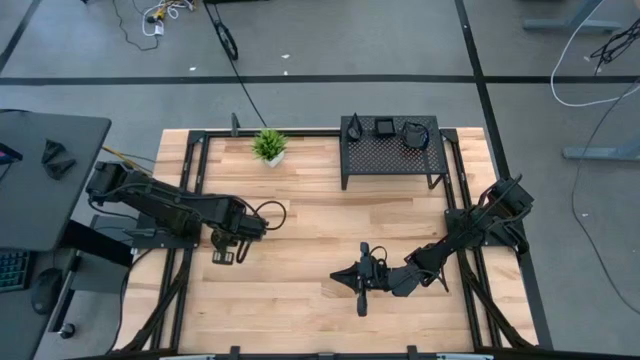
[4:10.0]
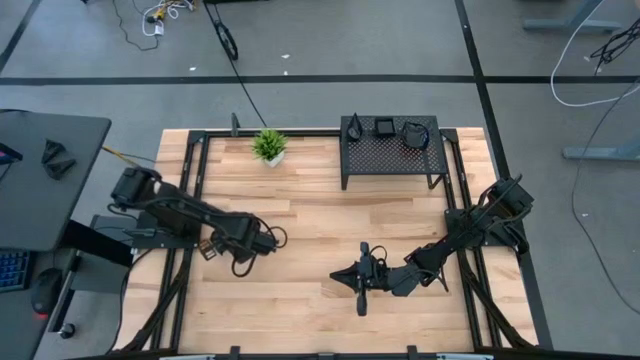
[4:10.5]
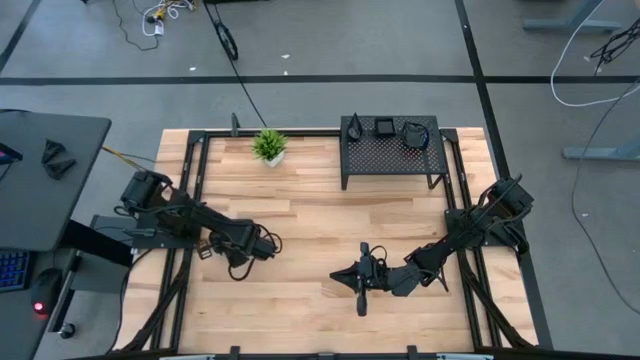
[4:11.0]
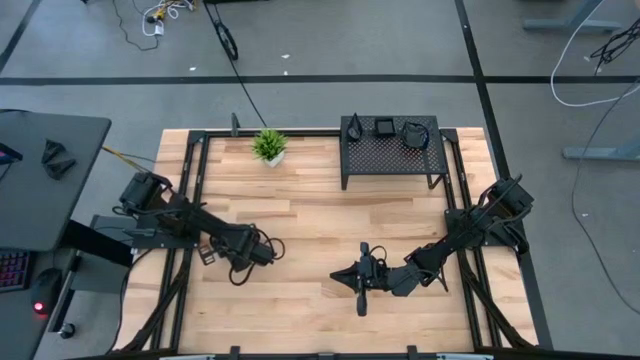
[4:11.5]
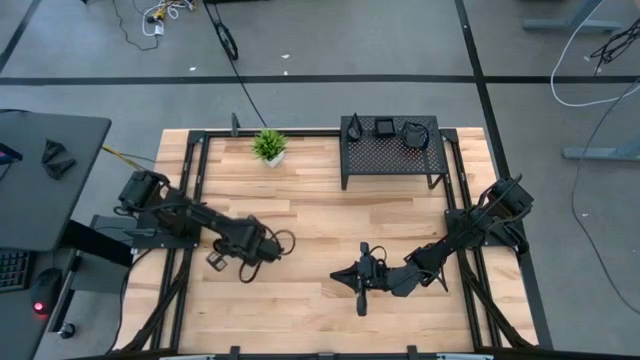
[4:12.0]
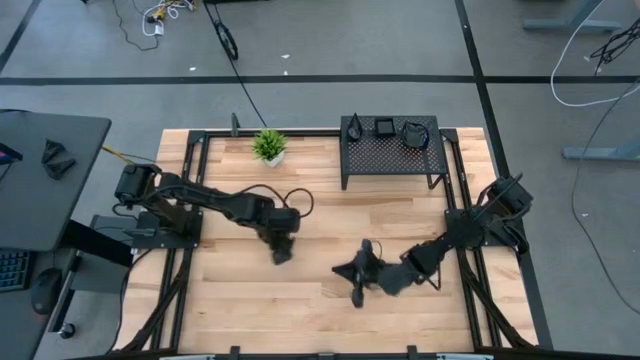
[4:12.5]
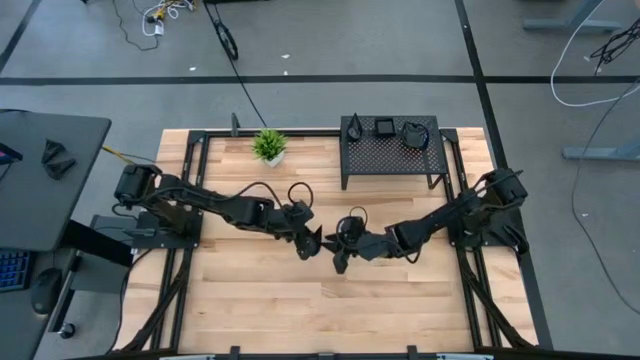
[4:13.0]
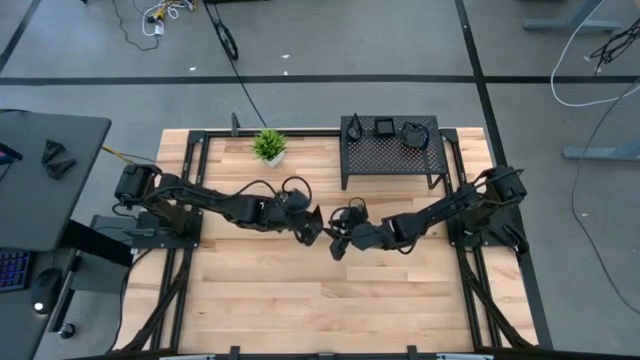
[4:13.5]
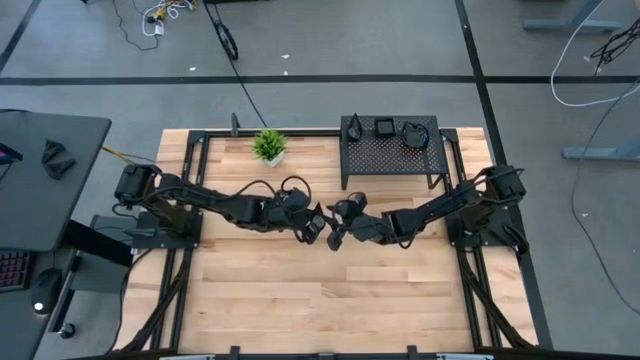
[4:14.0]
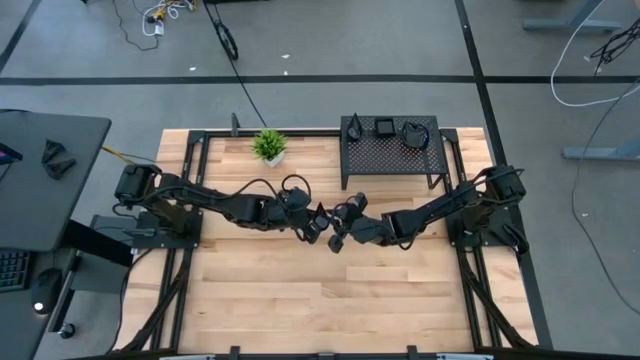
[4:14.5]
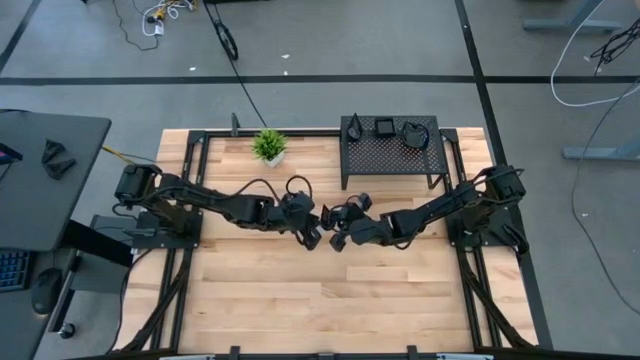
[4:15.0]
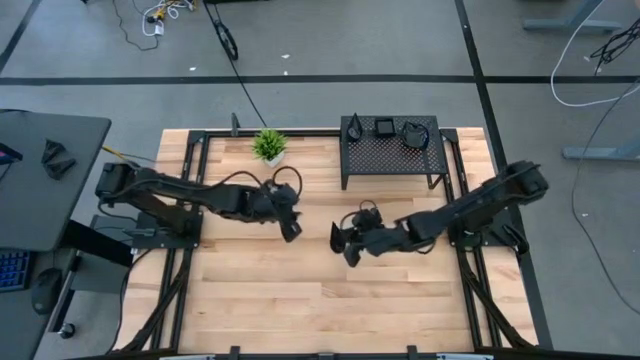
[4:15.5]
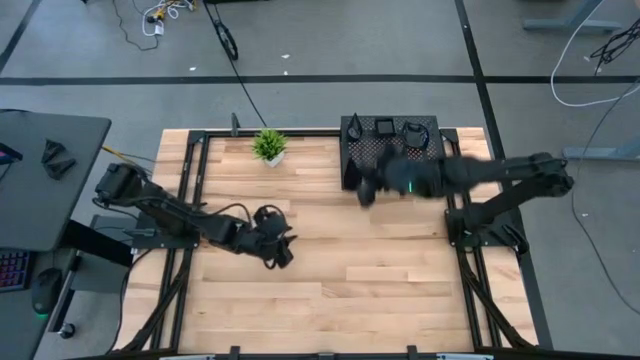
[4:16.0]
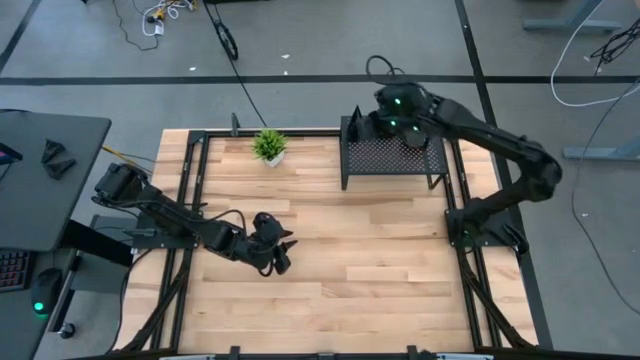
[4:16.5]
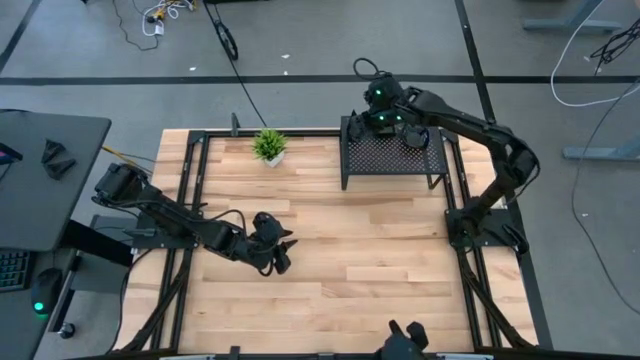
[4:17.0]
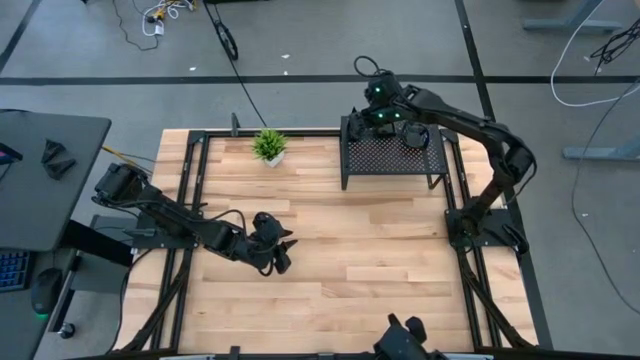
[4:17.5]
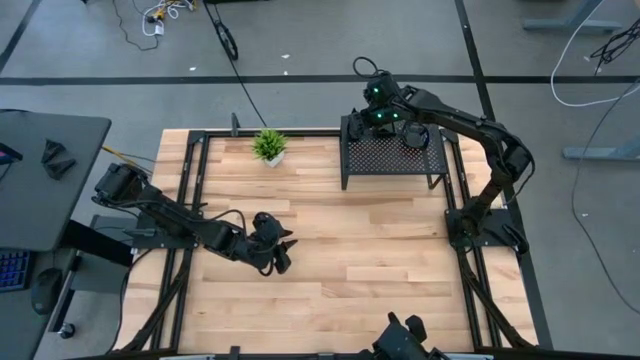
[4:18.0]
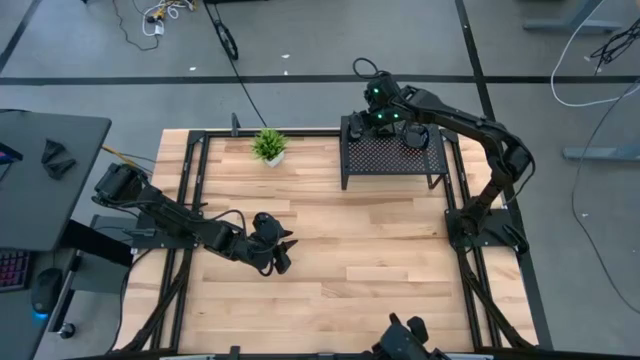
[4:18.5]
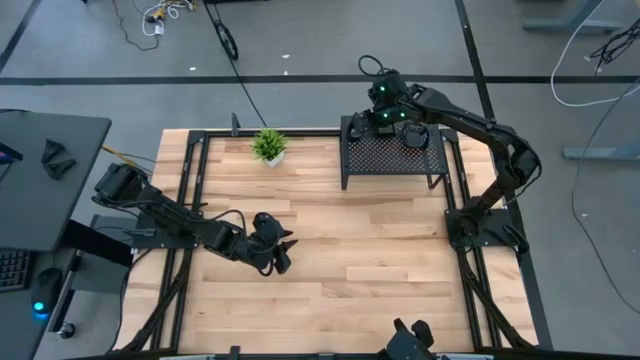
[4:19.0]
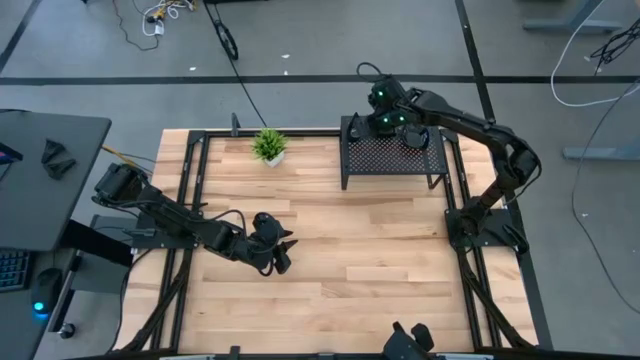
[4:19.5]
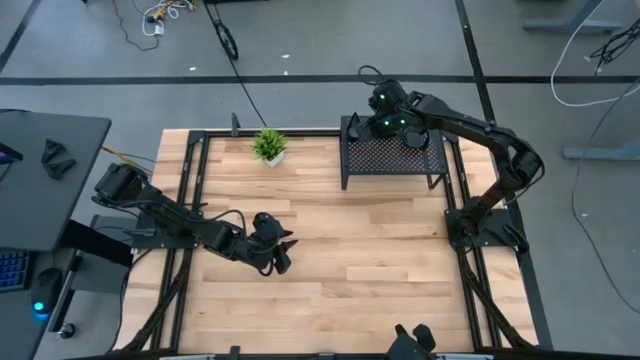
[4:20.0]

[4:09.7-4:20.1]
Task: Pick & Place Mini shaped plates
Stack the black drop-shaped plate on top of the black drop-shaped plate on the shelf

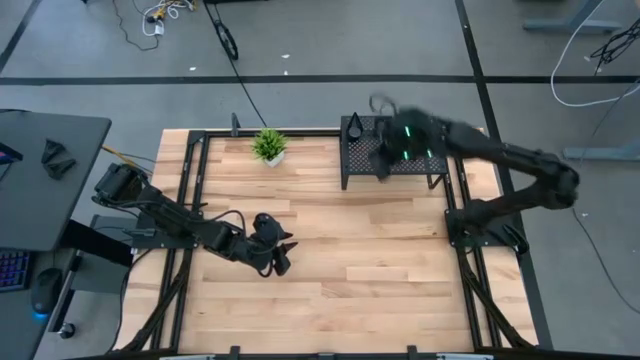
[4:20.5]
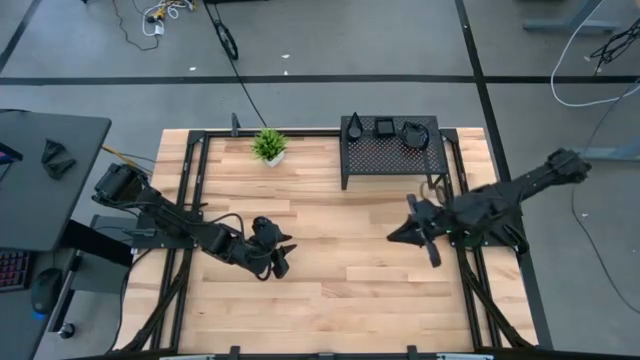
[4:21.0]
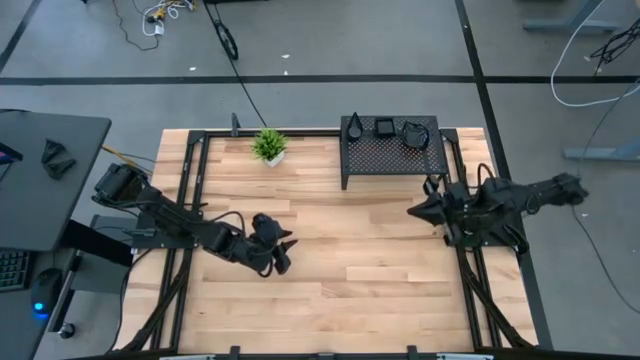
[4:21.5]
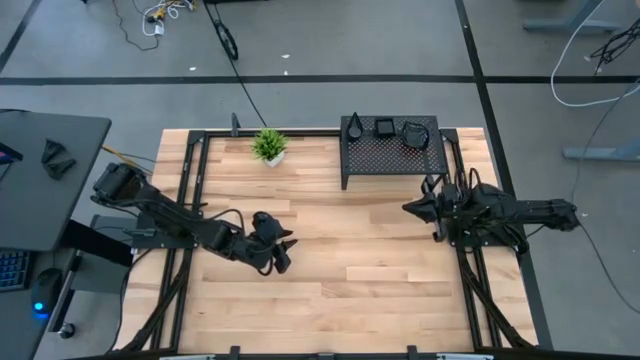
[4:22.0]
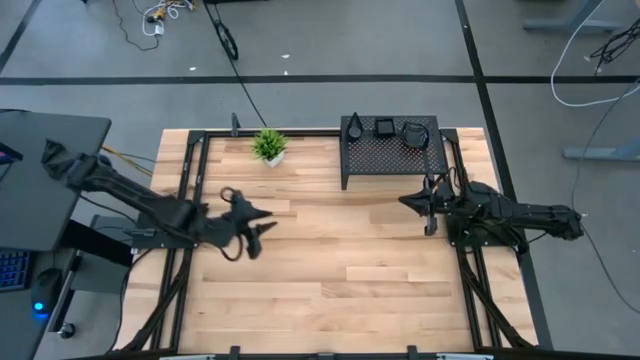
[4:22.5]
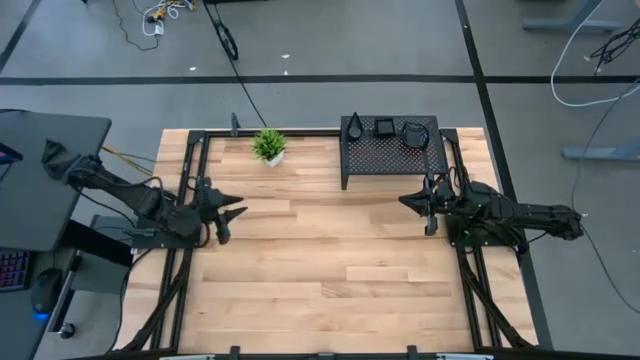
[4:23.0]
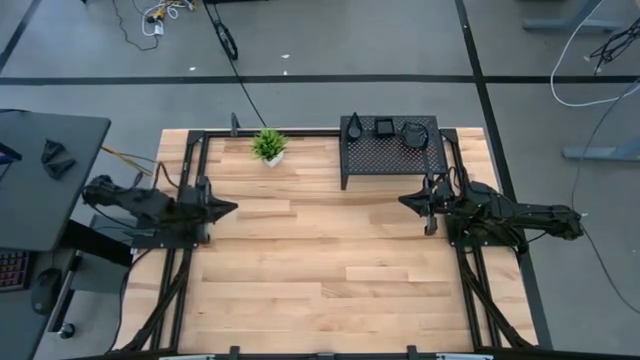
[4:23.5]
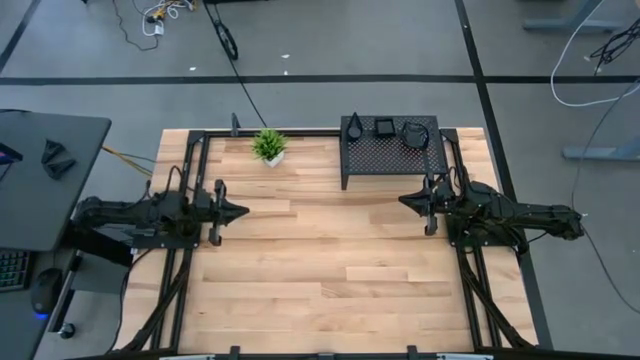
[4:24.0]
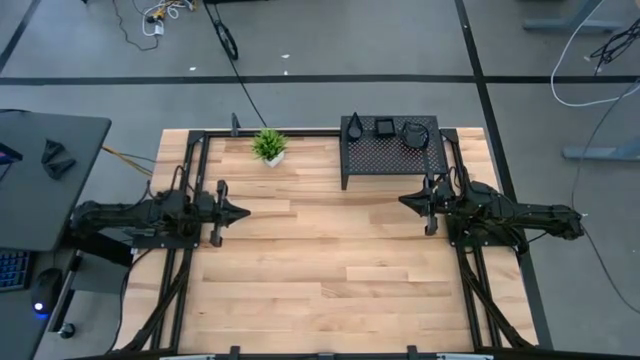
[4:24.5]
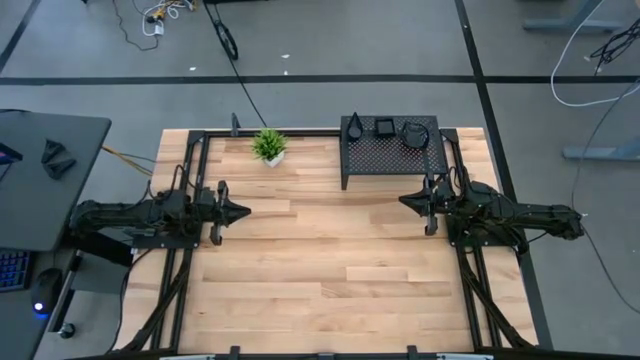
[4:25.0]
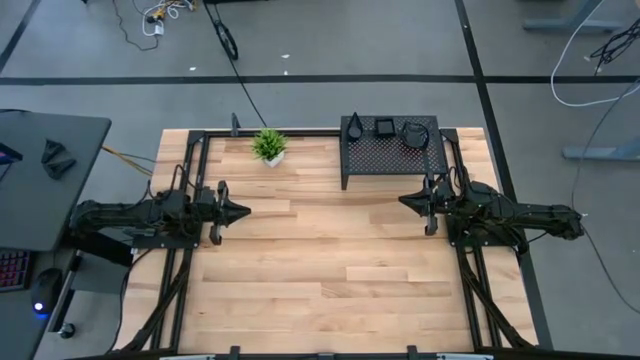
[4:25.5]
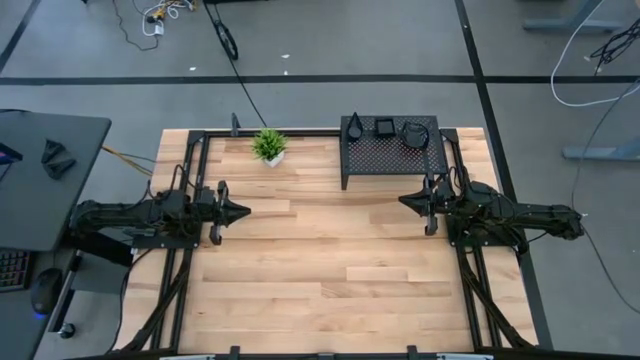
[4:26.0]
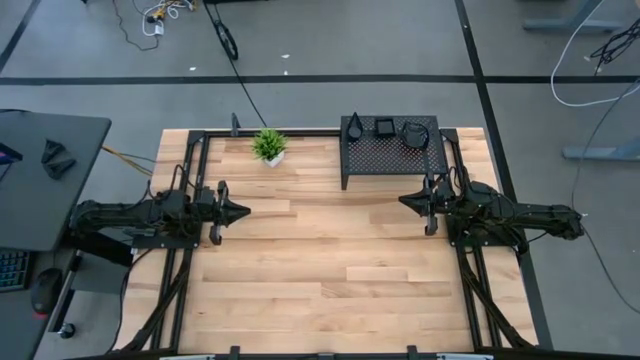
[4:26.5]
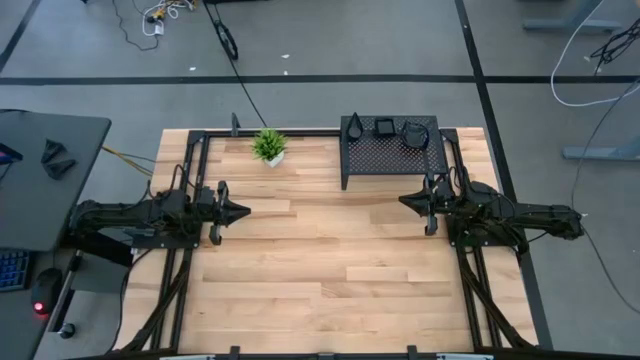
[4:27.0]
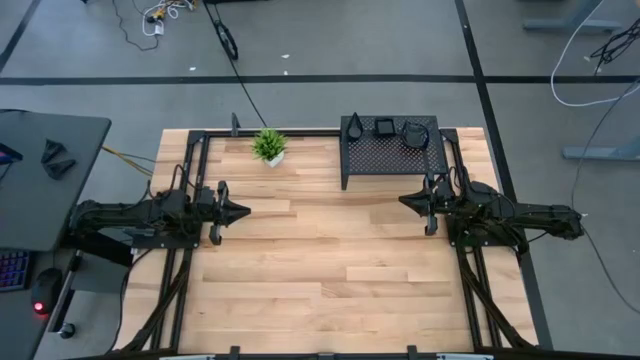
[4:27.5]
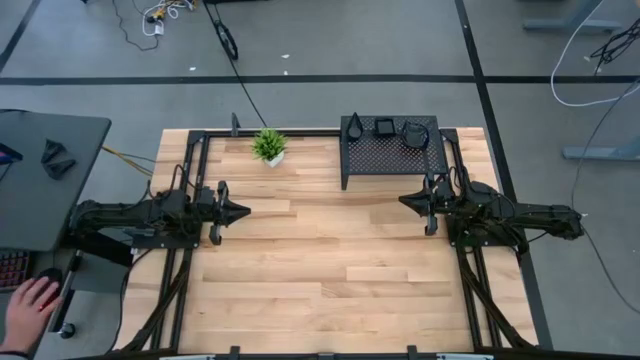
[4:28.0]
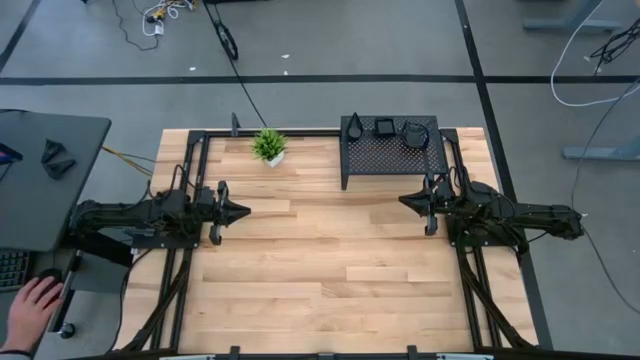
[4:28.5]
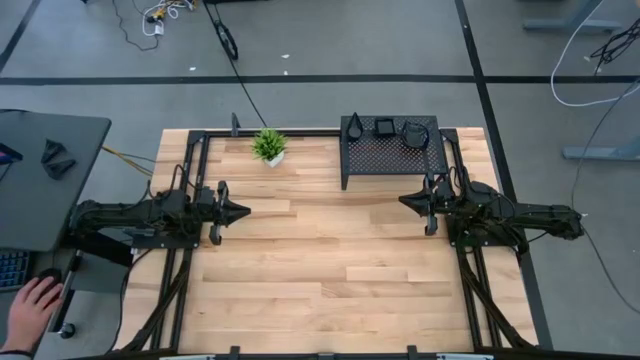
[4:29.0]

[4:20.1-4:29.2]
Return to Home Position

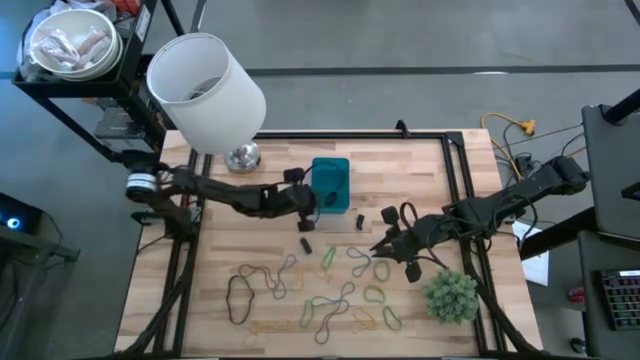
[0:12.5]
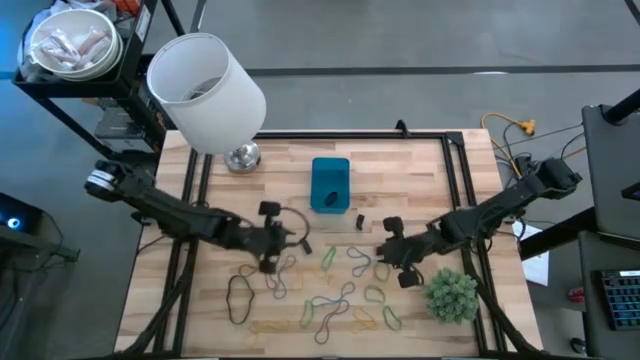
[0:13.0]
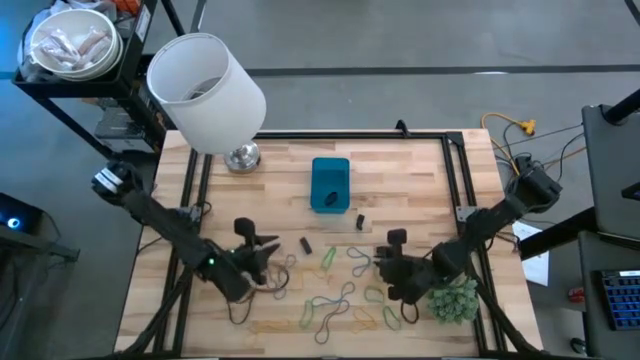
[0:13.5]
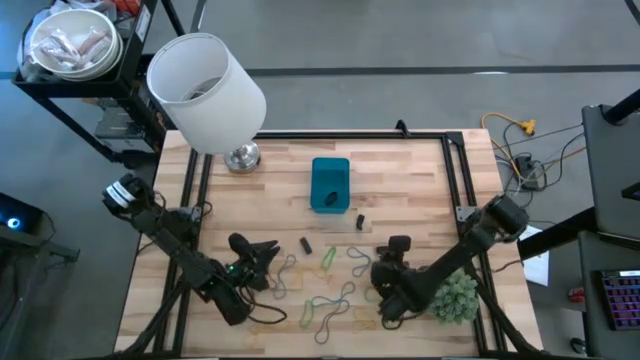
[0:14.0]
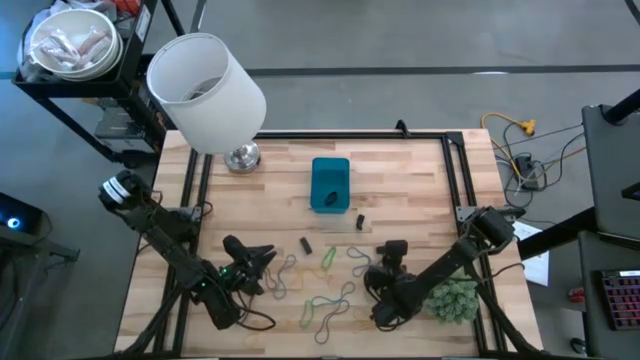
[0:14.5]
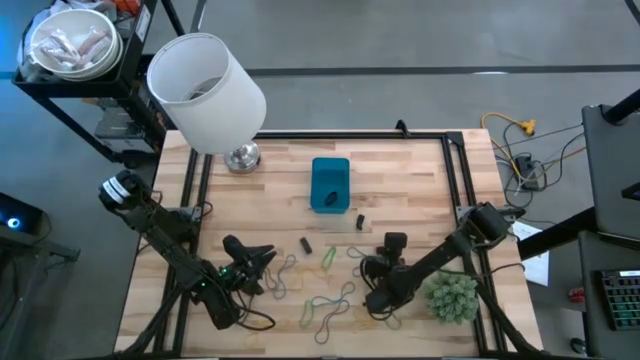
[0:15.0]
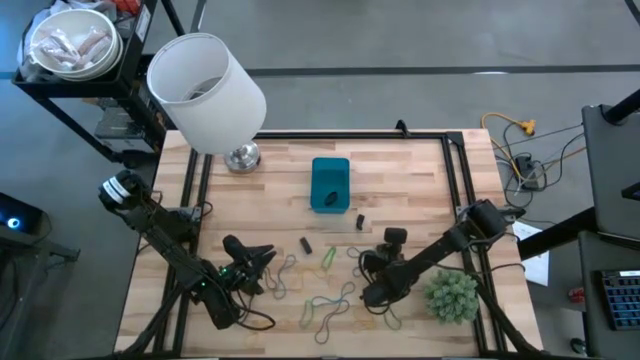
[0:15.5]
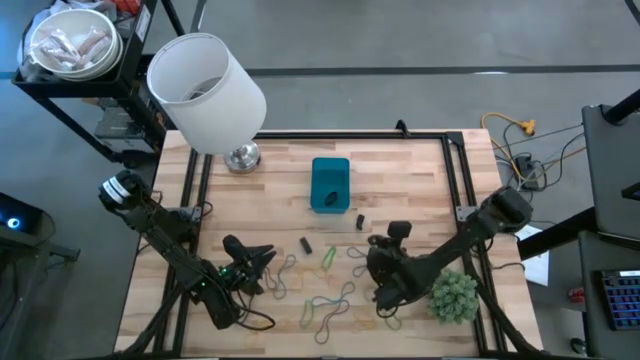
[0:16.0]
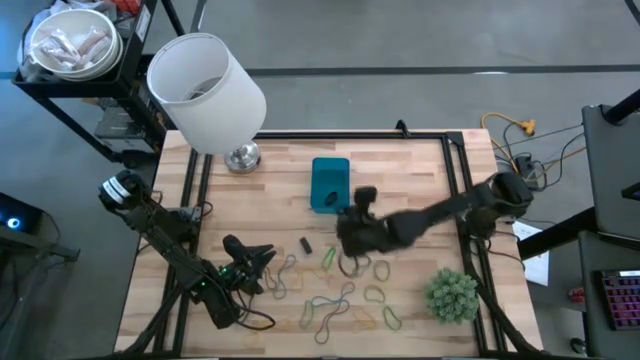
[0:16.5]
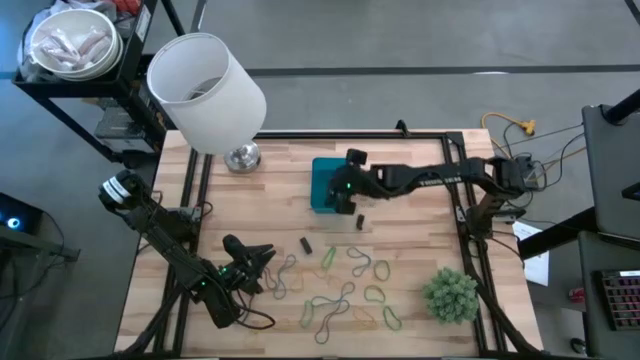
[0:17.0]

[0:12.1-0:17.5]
Task: Pick and place rubber bands into bin
Put the black rubber band into the blue bin
